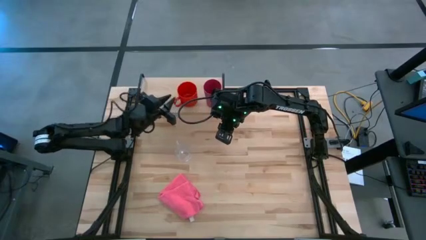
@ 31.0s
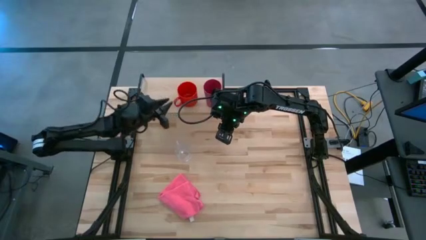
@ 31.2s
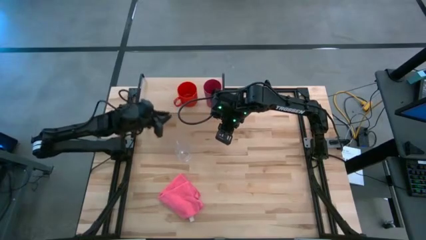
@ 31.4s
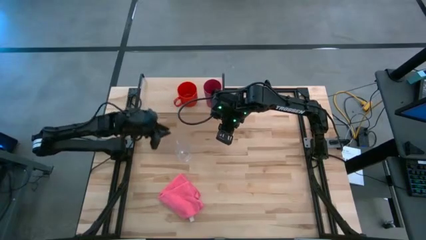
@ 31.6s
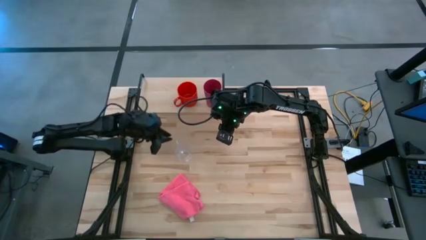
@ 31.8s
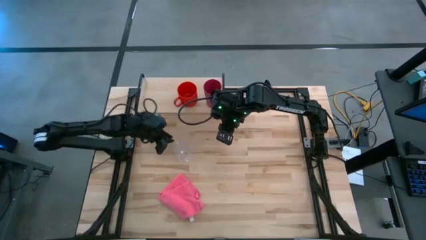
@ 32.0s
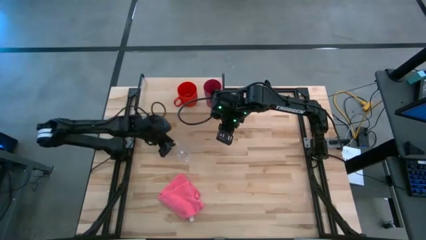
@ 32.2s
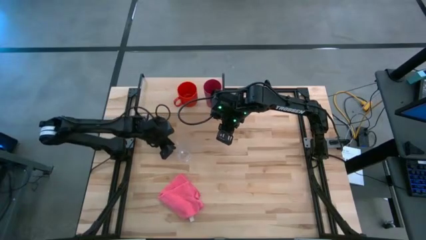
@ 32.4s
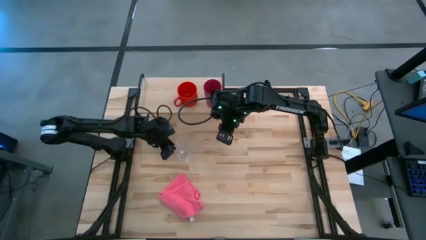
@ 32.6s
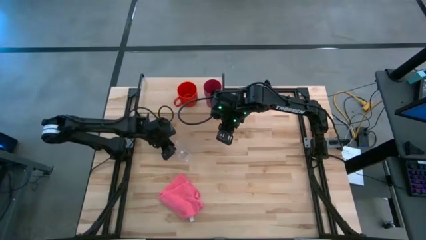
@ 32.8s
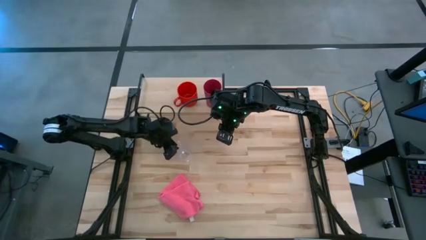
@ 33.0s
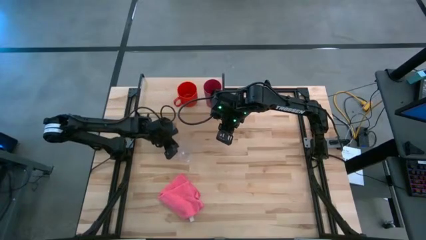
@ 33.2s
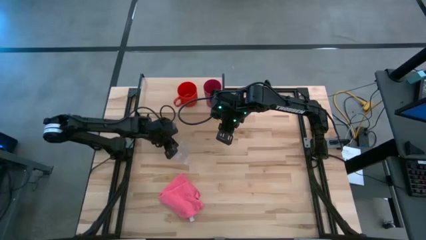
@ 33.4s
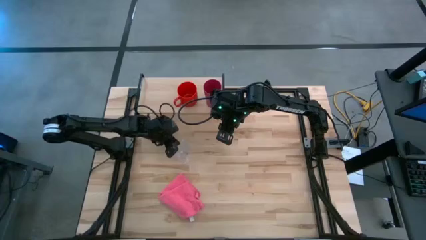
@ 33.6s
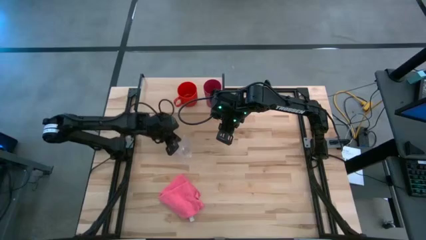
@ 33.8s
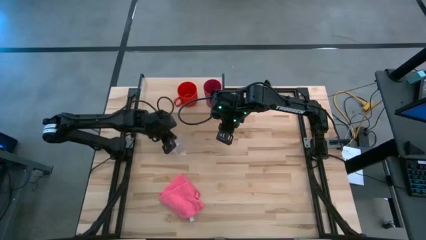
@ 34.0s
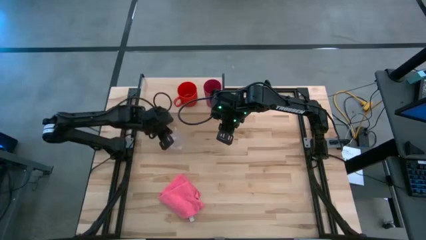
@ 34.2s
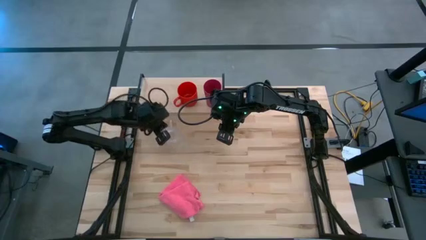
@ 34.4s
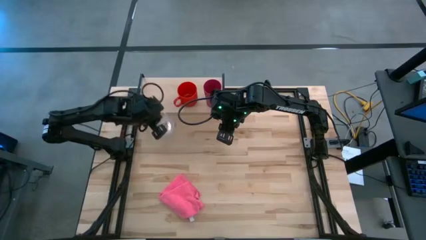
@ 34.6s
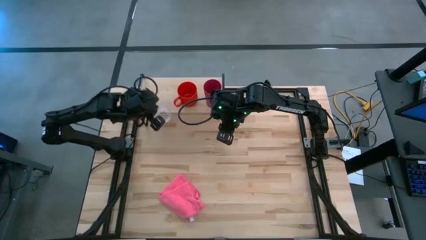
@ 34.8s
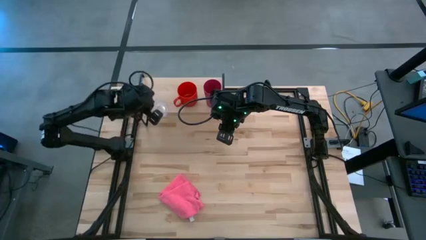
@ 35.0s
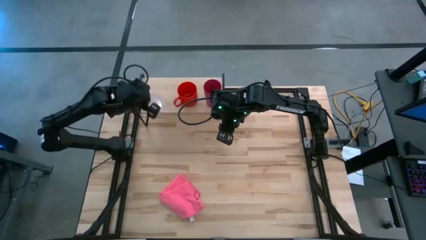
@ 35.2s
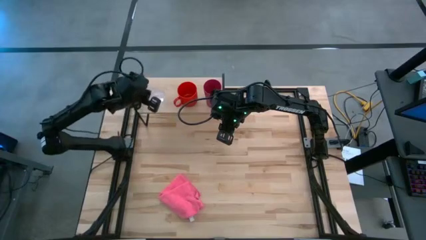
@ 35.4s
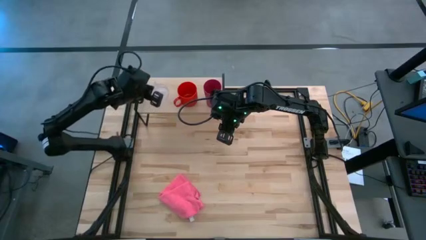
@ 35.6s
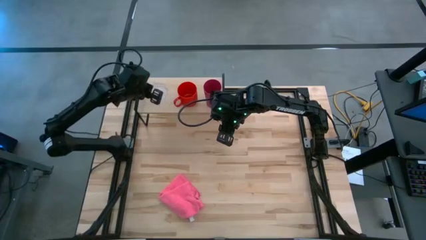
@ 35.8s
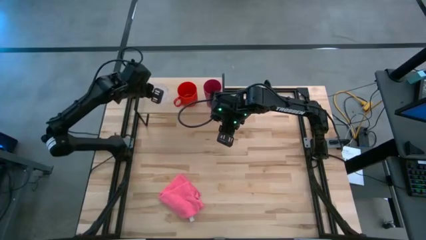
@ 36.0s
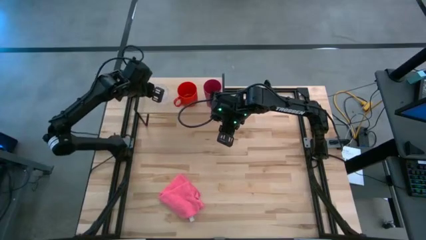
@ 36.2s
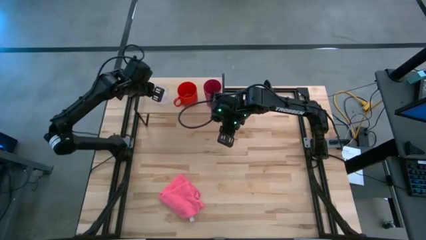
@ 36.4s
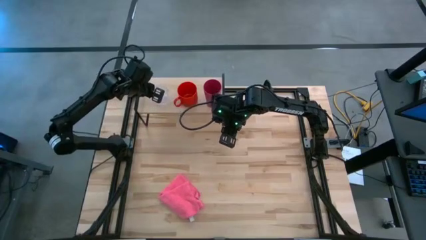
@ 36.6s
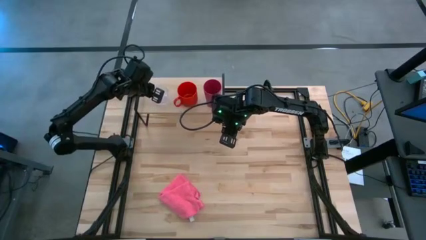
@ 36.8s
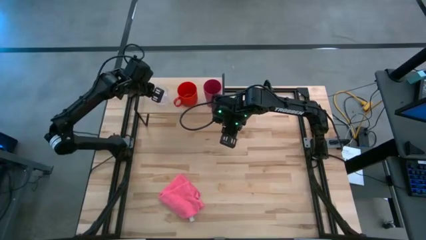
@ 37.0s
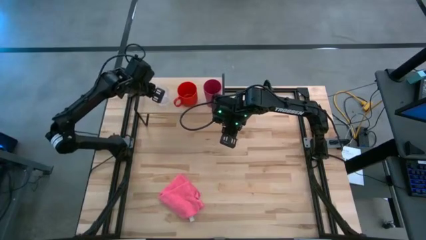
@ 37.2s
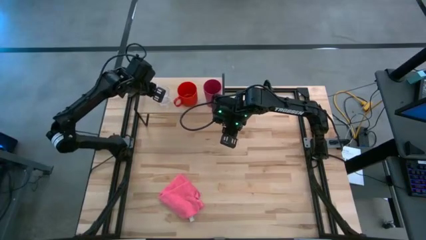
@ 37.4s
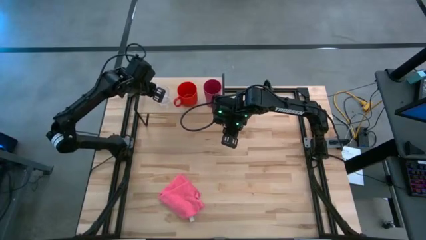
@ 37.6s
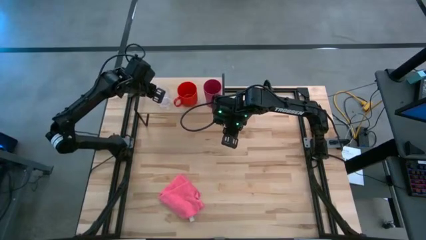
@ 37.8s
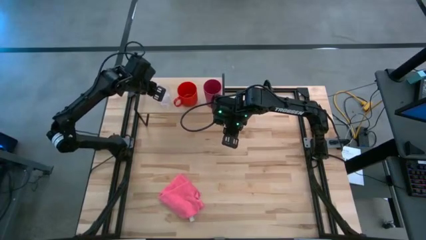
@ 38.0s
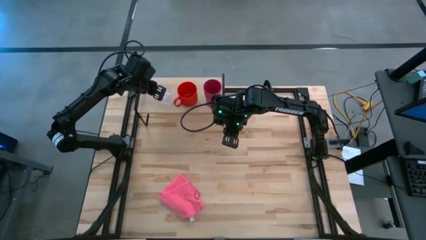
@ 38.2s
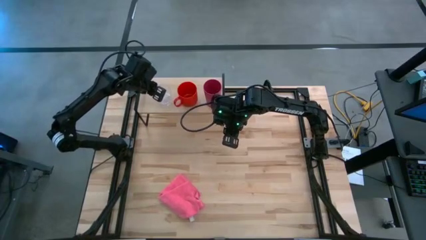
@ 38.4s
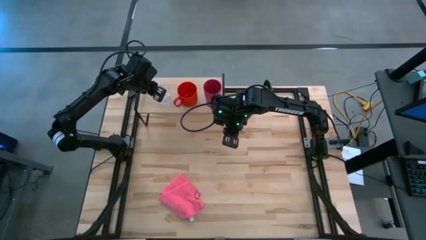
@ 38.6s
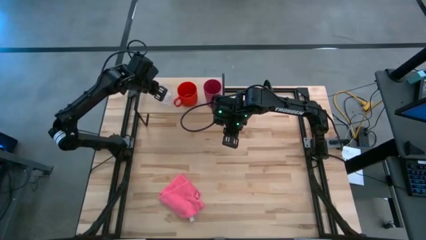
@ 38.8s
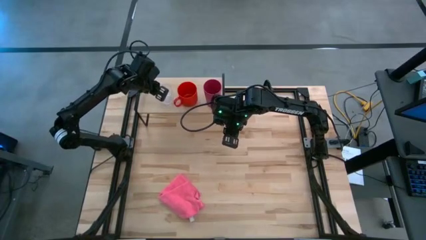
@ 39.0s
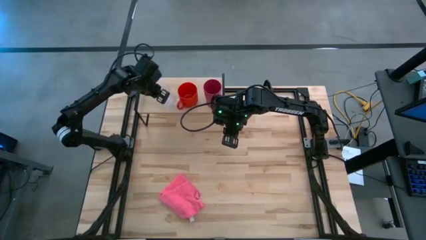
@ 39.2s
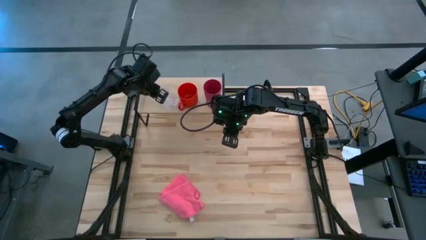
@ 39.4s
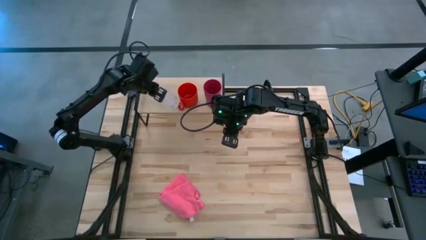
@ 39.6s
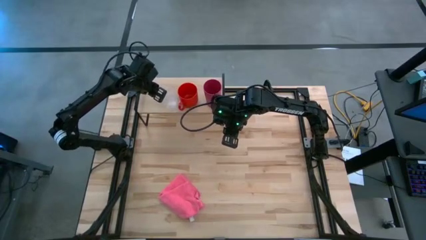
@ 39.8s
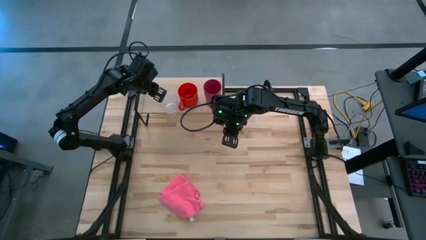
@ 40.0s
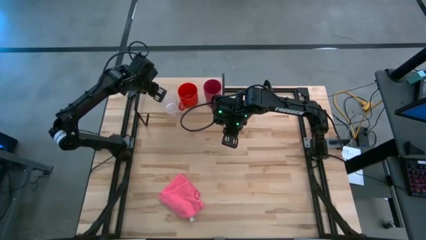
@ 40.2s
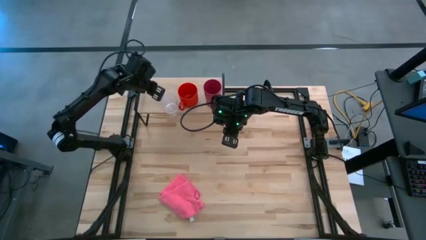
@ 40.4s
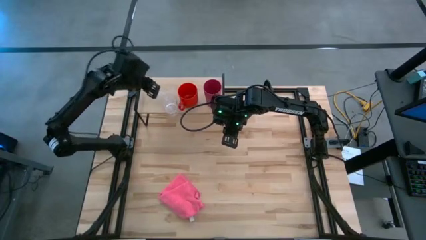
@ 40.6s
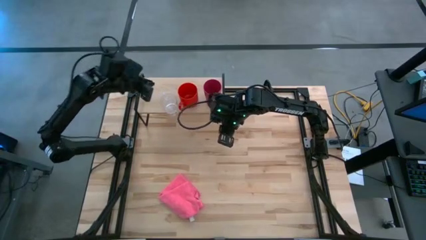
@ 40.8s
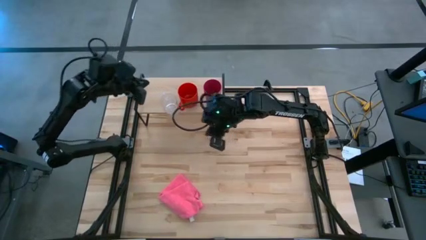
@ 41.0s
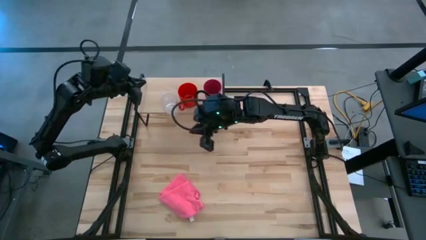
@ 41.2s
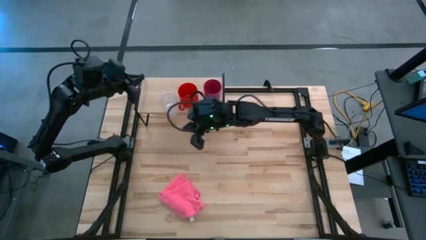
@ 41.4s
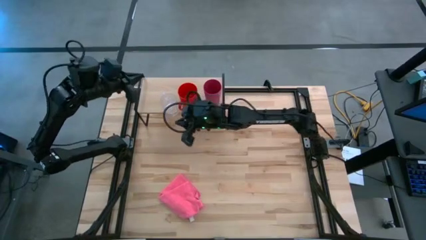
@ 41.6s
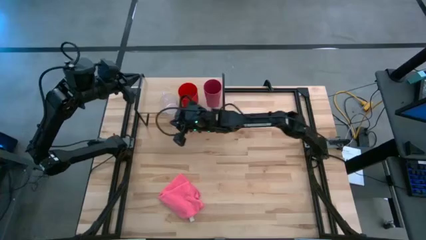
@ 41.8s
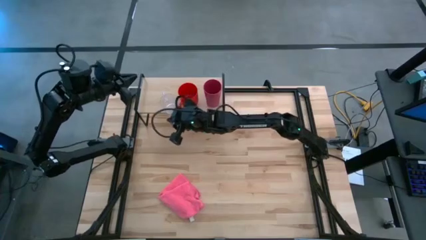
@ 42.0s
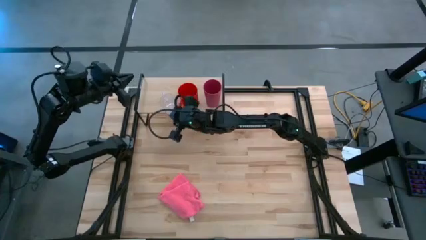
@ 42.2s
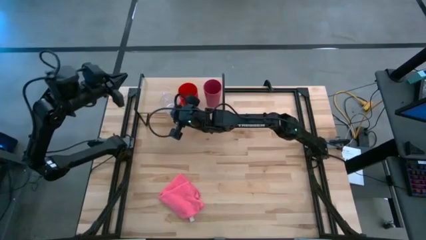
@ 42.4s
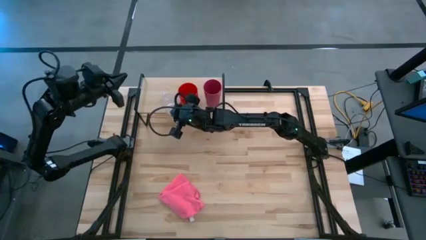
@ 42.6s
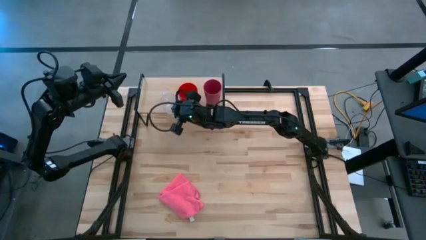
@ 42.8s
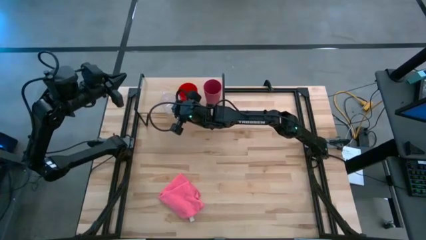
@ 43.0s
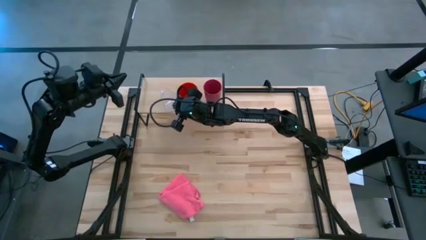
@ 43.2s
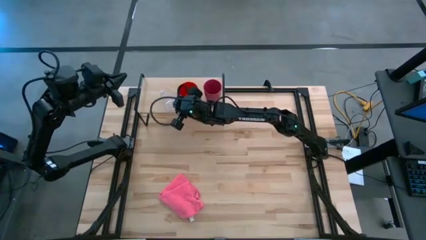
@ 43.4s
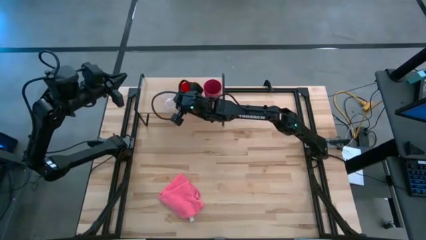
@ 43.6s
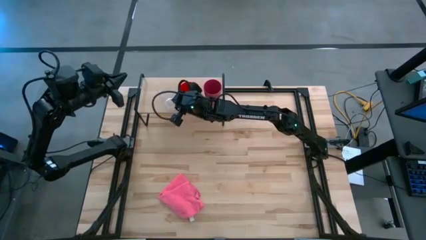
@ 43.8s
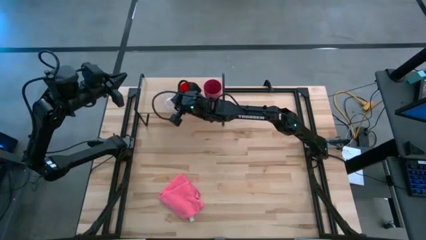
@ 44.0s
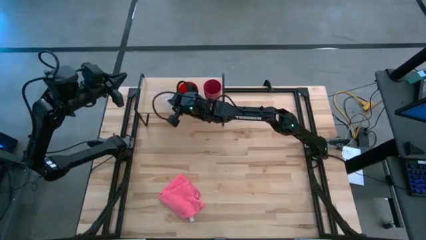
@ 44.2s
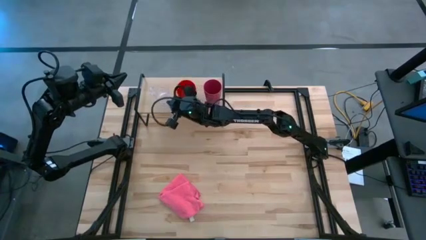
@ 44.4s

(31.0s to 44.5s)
Task: Stack small to large cups/mugs on shelf
Put the transparent mug on the shelf
